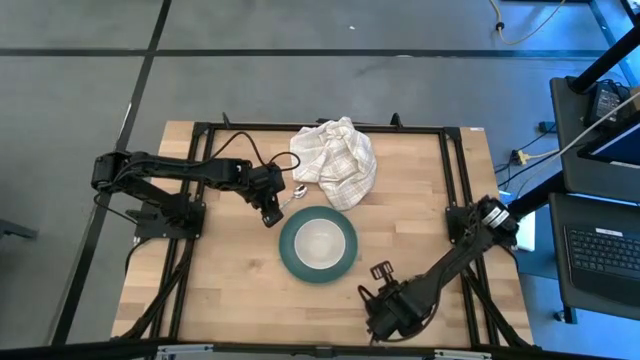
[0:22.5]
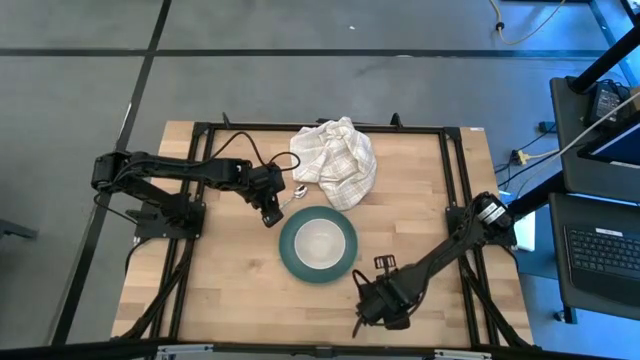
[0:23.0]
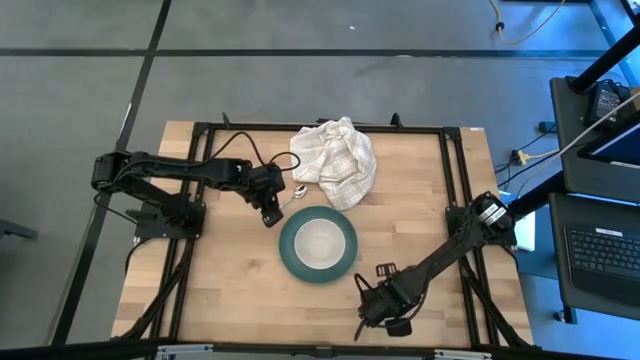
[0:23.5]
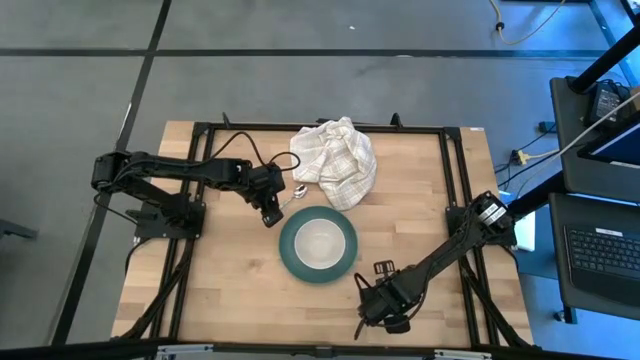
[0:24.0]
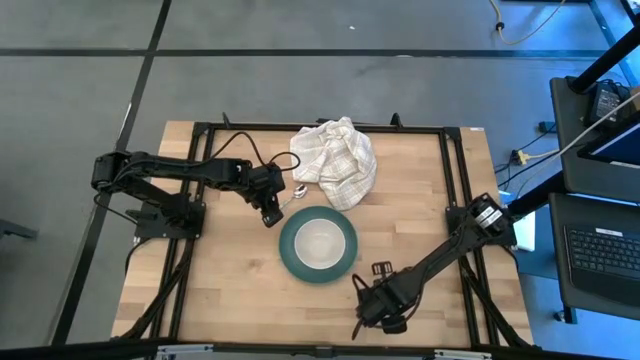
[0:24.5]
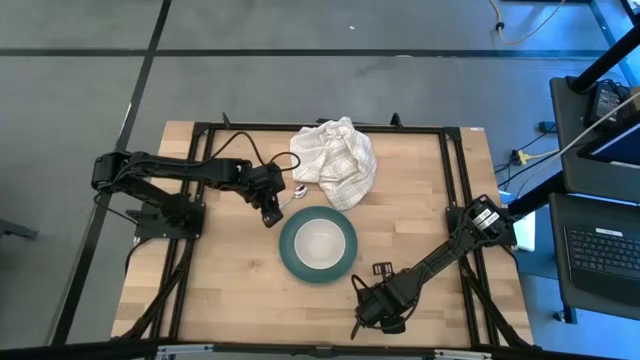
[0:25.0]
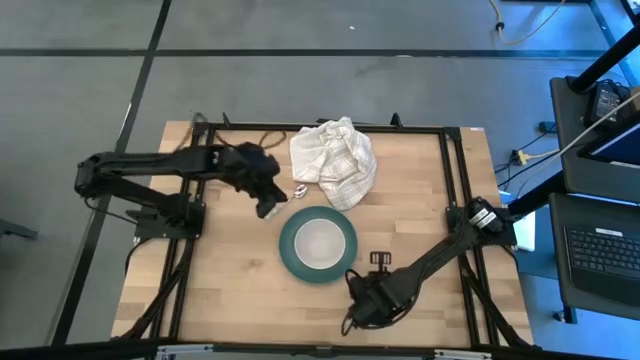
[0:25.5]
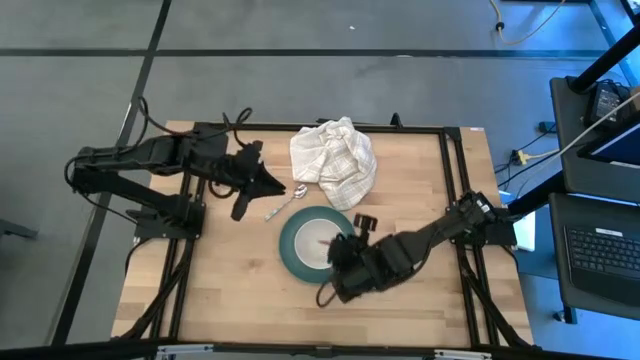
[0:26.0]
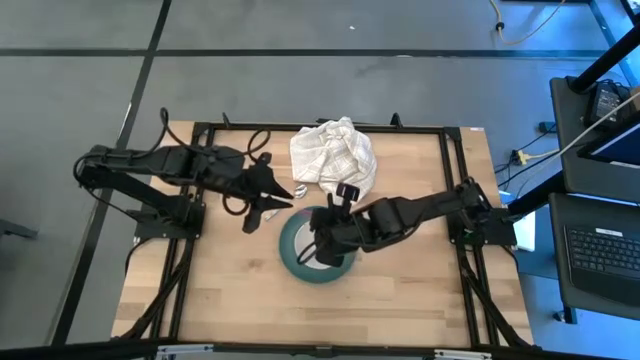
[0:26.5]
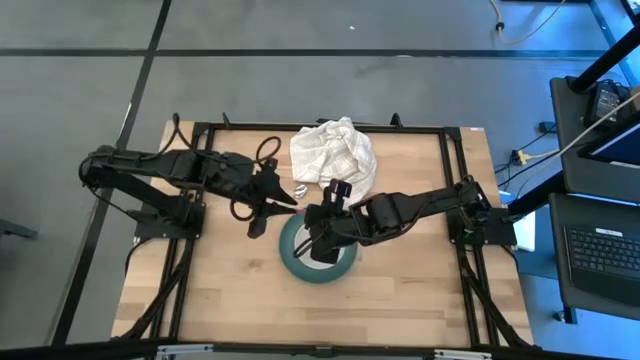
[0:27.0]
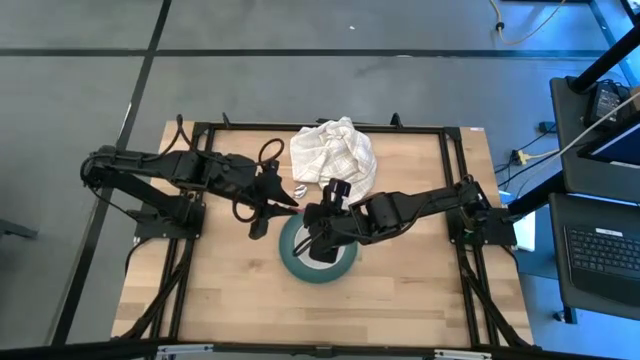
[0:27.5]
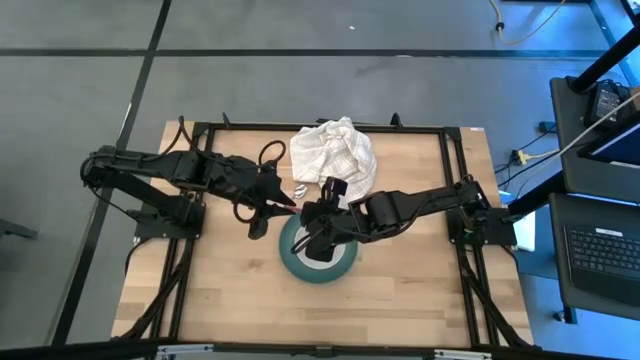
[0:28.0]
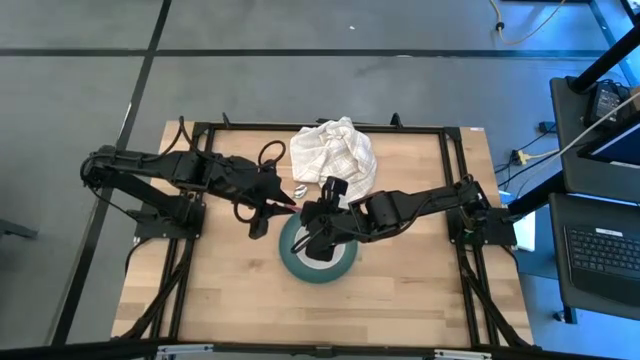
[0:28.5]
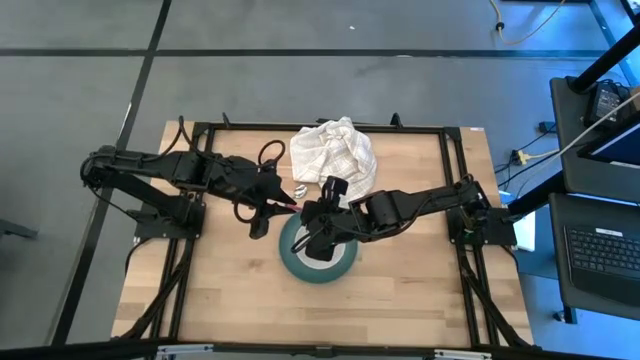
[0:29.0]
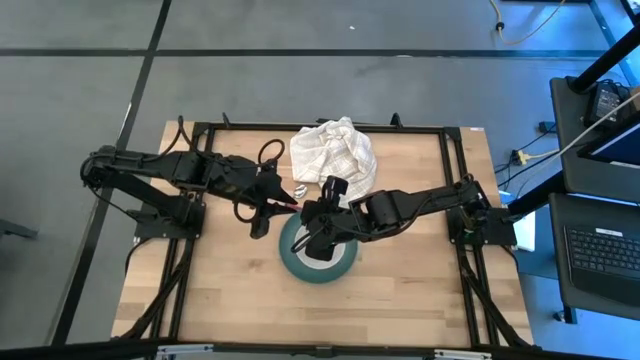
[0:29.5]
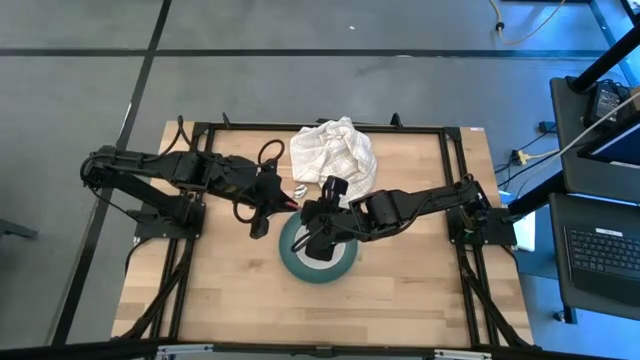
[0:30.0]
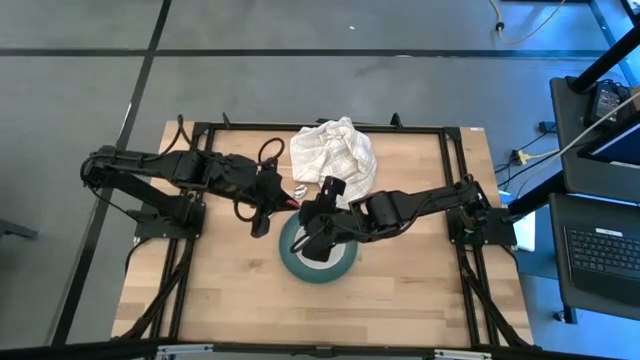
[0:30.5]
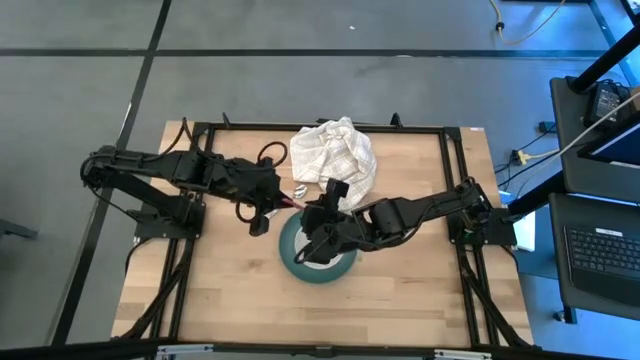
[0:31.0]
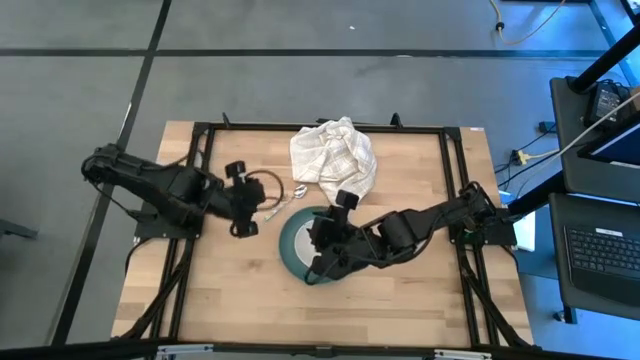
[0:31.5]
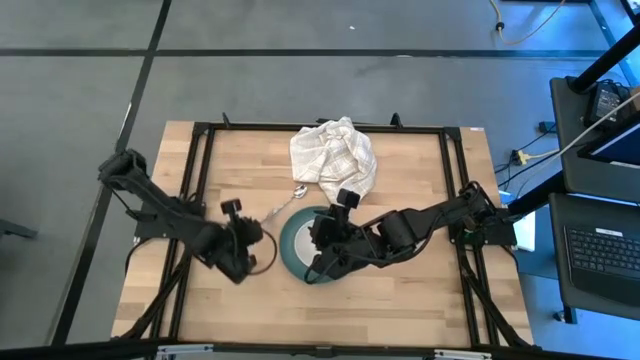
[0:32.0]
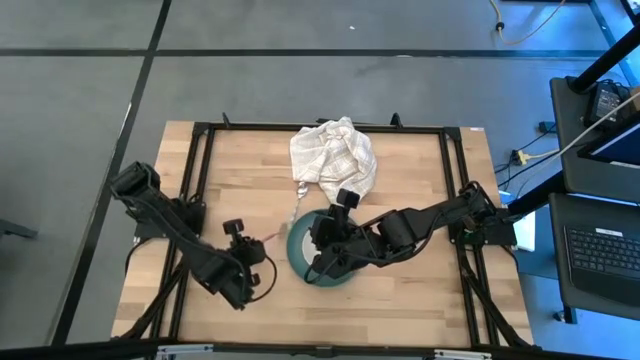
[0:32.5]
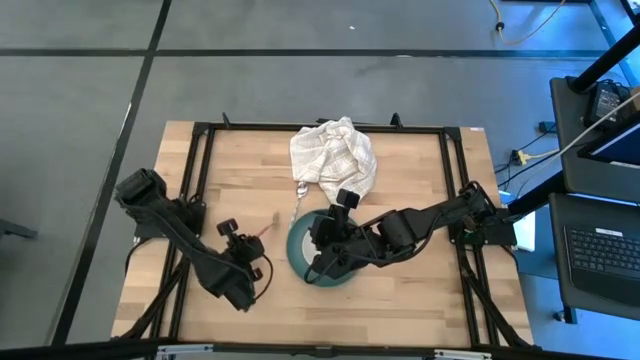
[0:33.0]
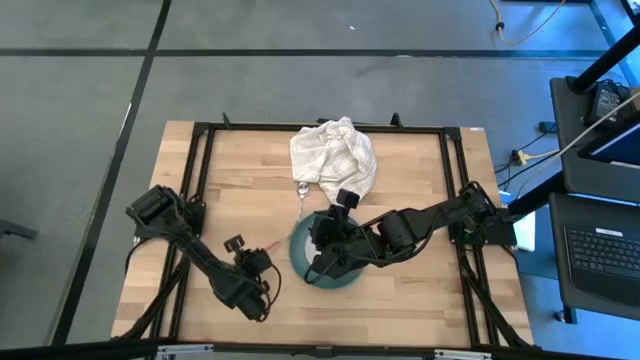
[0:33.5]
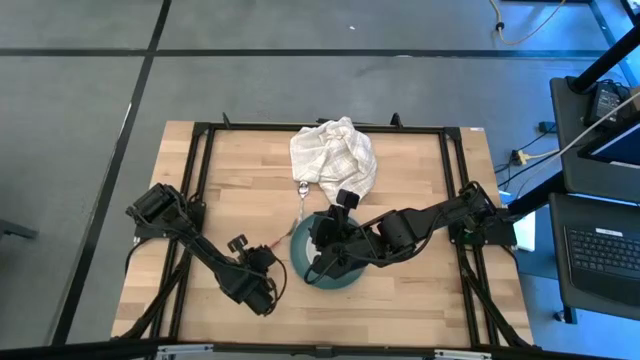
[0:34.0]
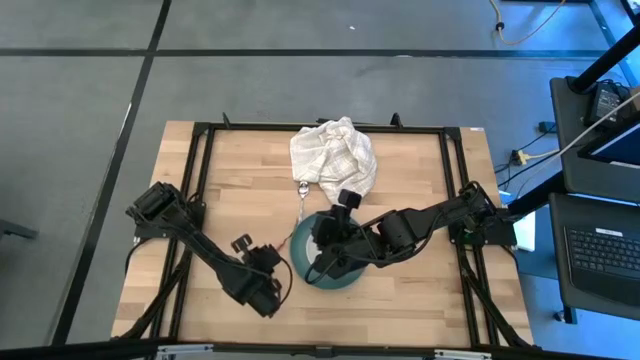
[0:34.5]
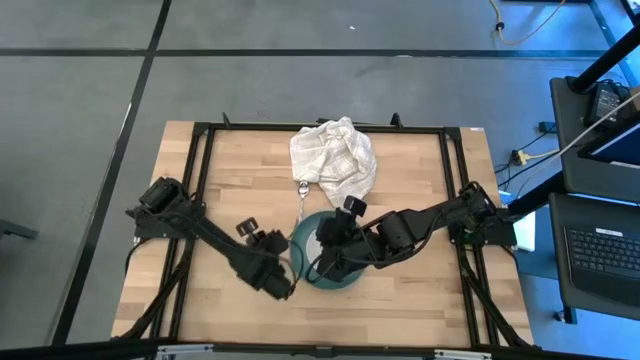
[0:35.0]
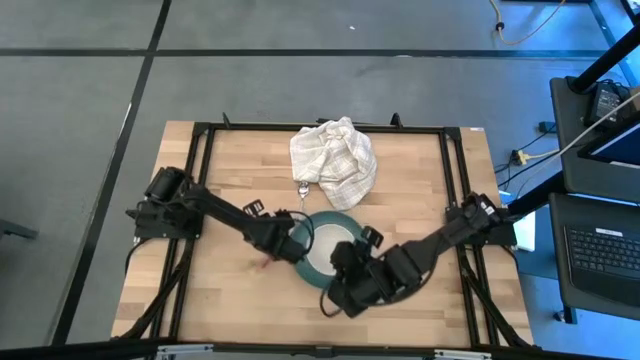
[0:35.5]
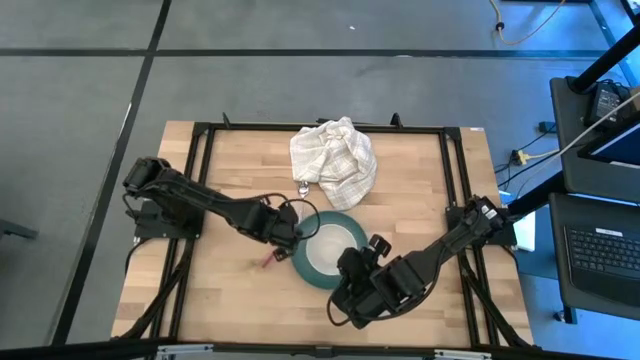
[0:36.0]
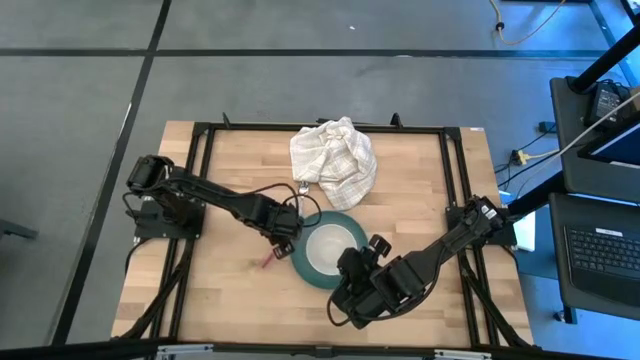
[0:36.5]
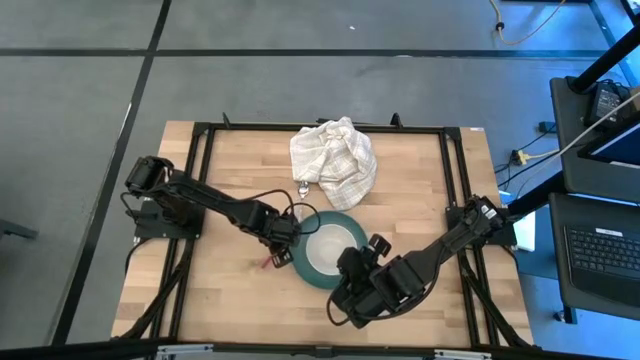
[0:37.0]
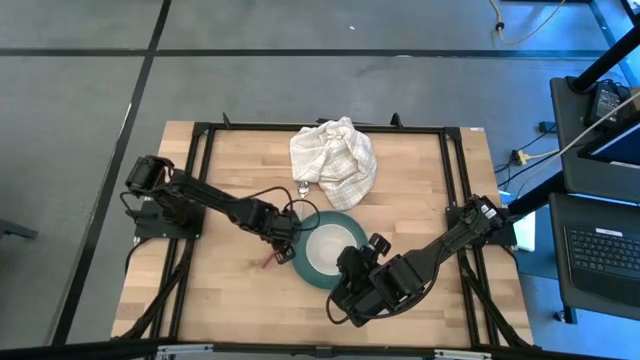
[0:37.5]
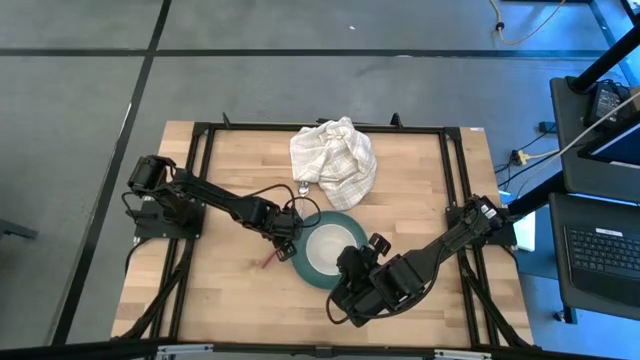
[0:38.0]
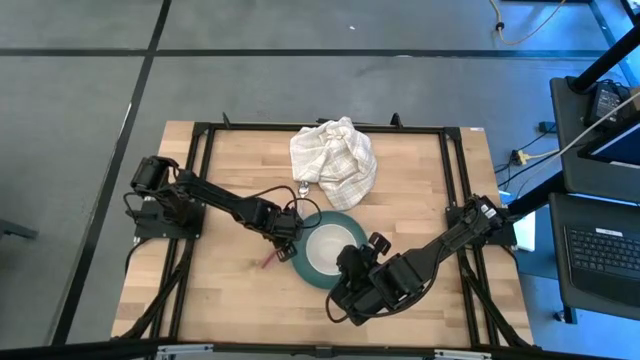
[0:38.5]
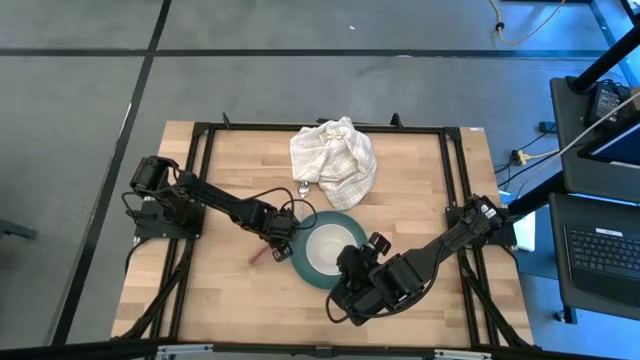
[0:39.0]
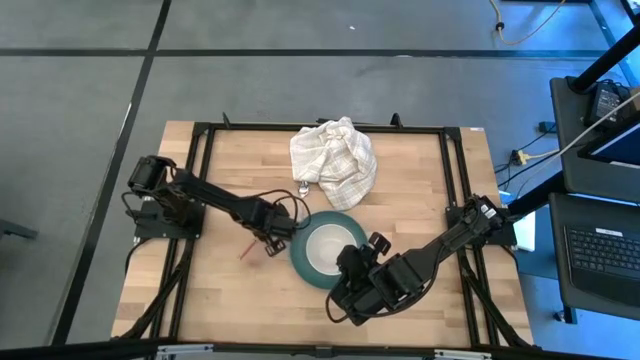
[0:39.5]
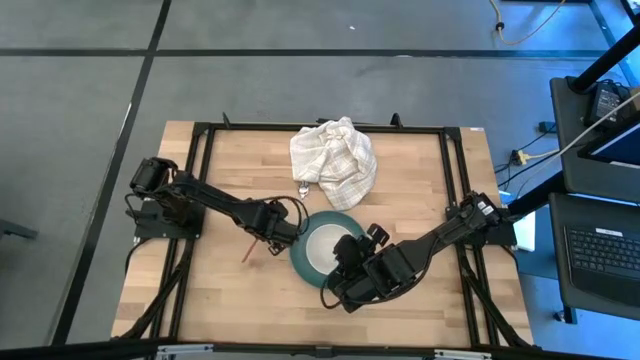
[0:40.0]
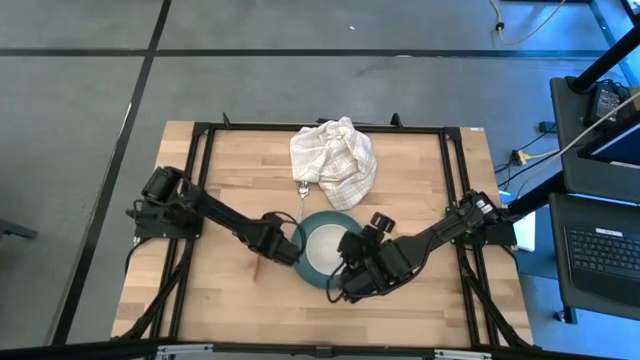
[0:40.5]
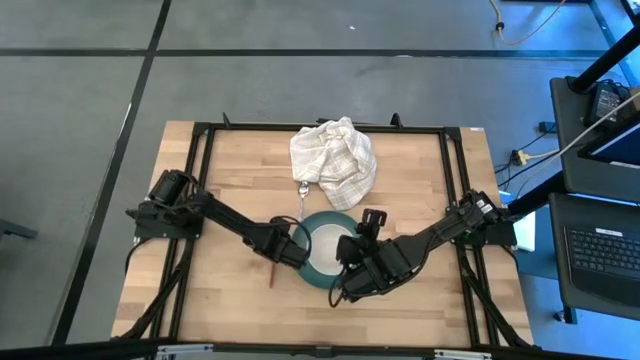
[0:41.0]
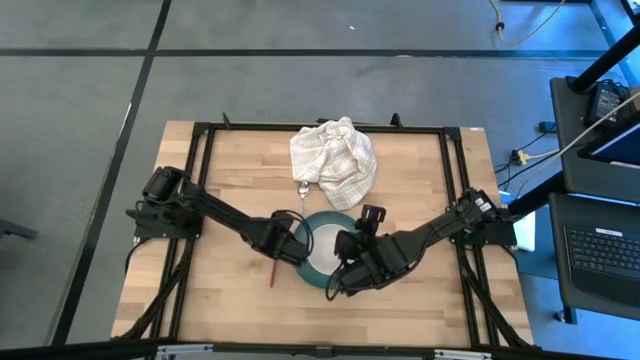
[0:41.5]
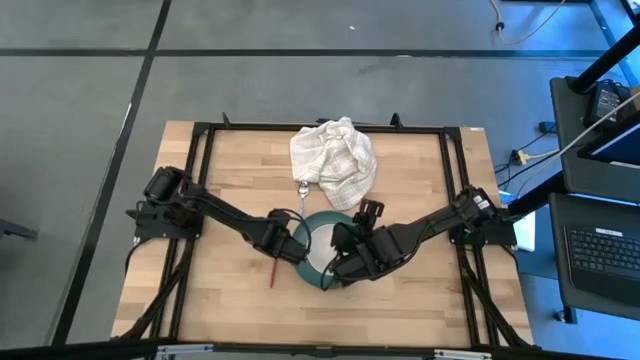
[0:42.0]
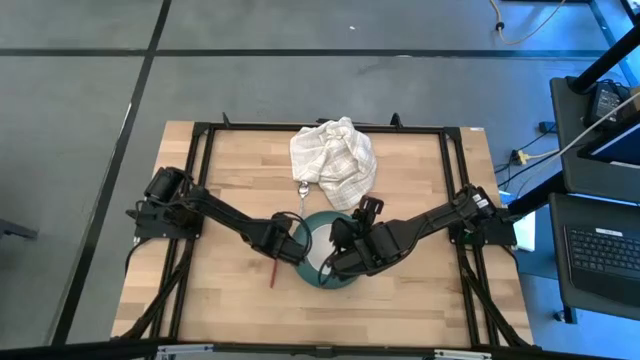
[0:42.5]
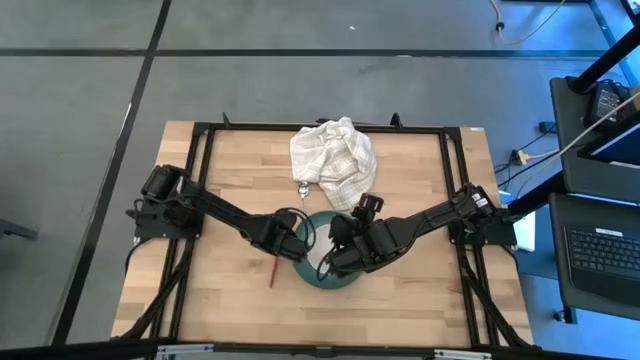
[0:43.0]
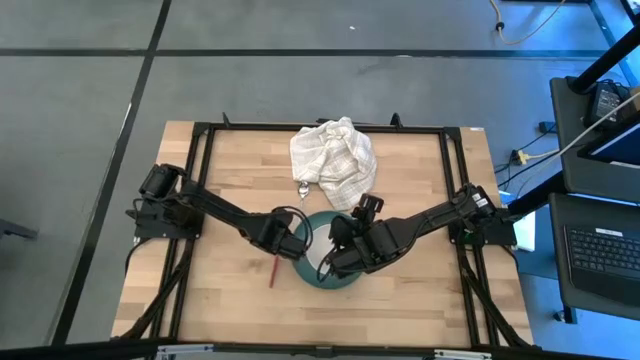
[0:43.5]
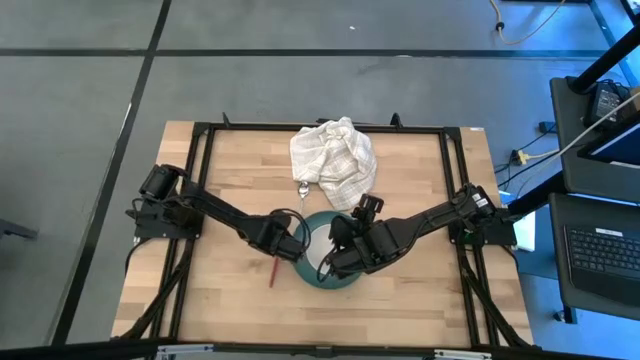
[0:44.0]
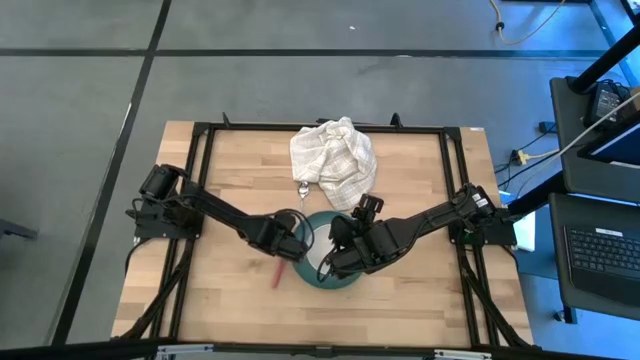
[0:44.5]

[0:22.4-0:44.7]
Task: Set table place
Move the pink fork to the left of the green plate on the table
